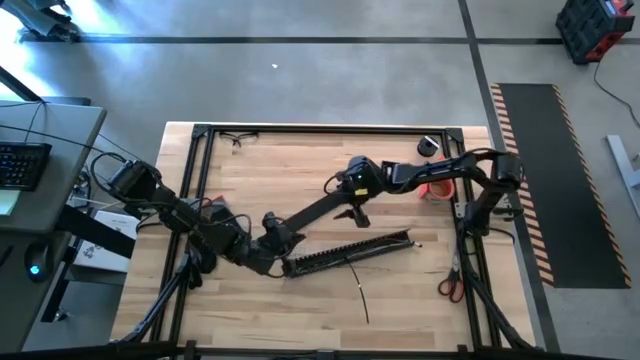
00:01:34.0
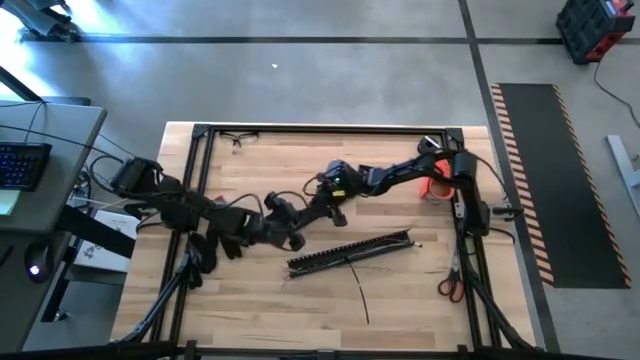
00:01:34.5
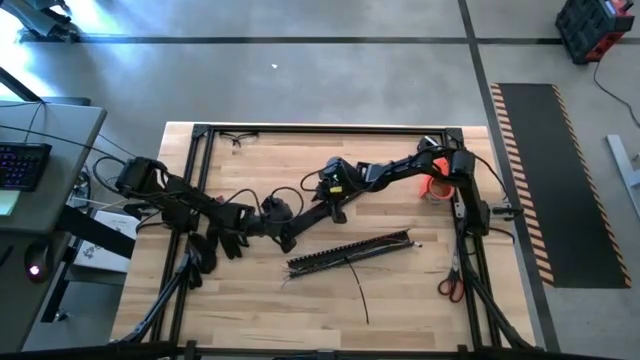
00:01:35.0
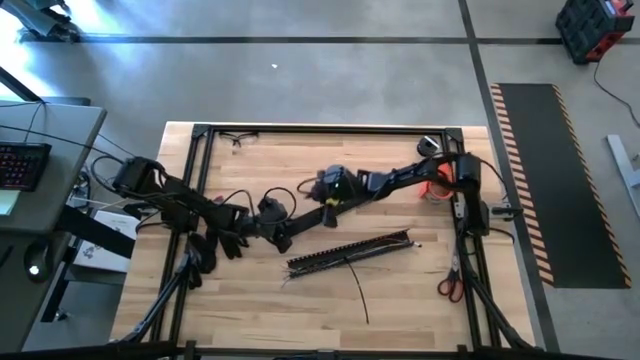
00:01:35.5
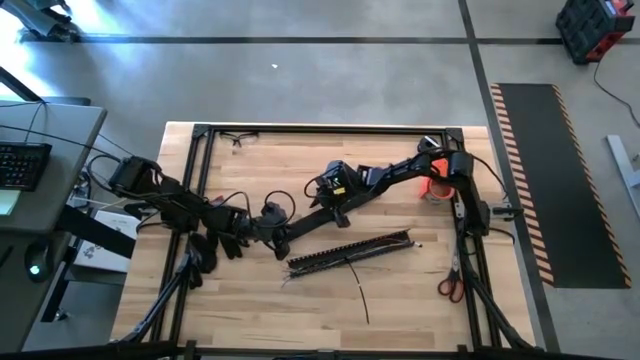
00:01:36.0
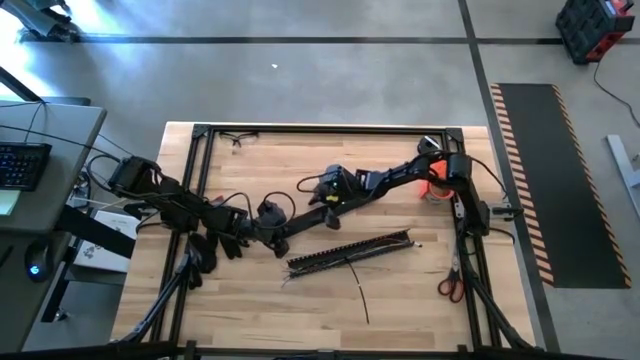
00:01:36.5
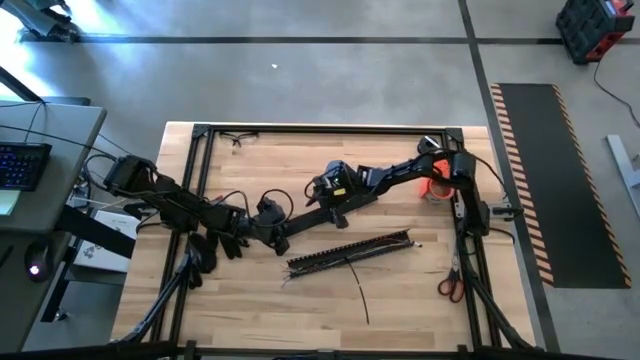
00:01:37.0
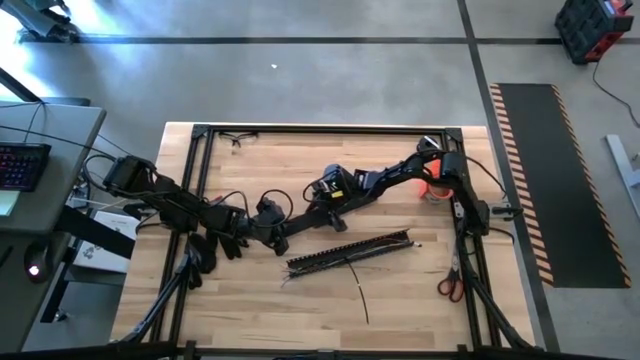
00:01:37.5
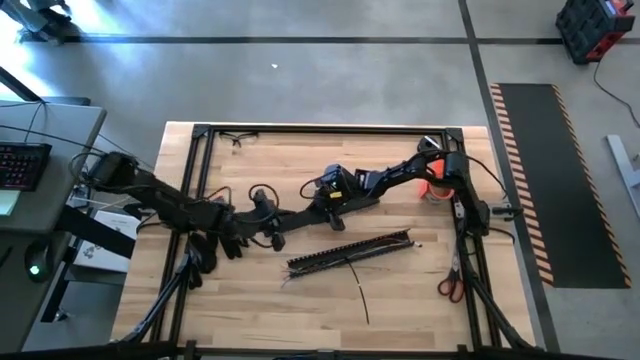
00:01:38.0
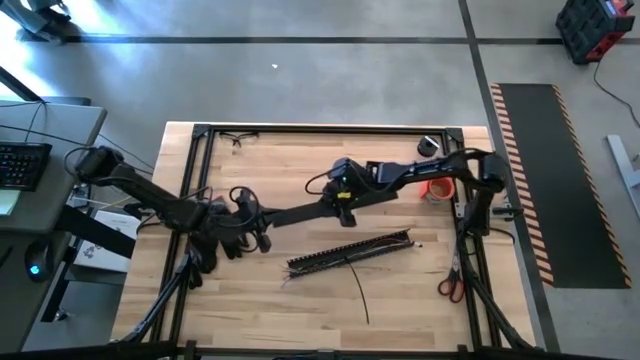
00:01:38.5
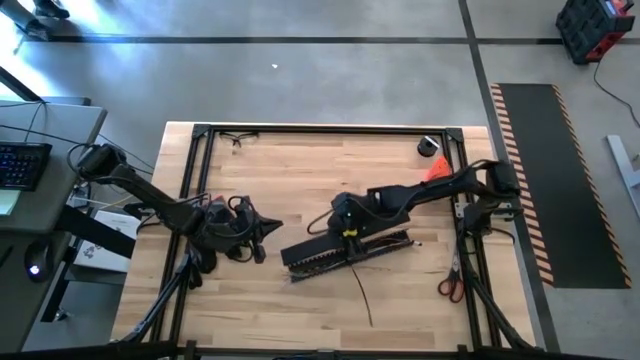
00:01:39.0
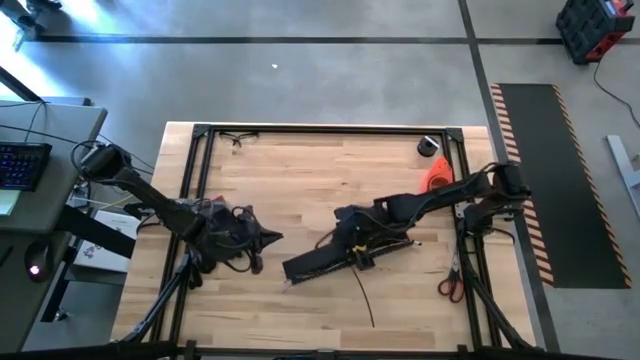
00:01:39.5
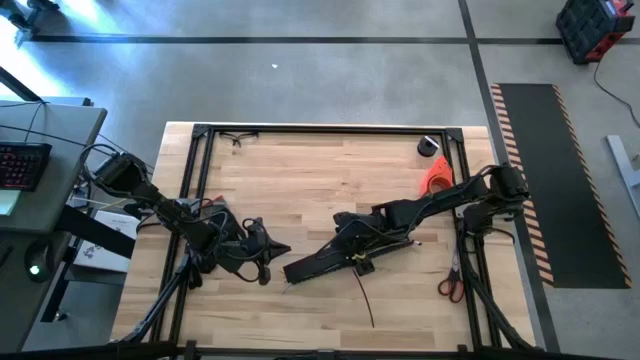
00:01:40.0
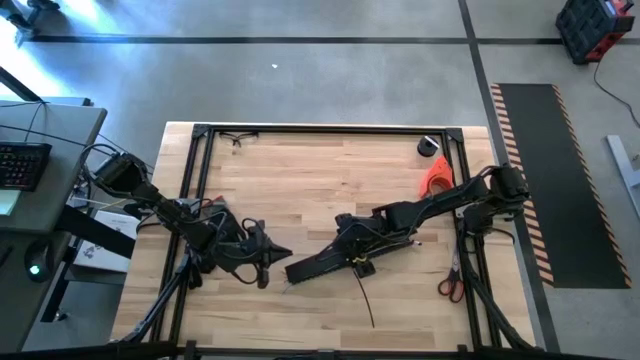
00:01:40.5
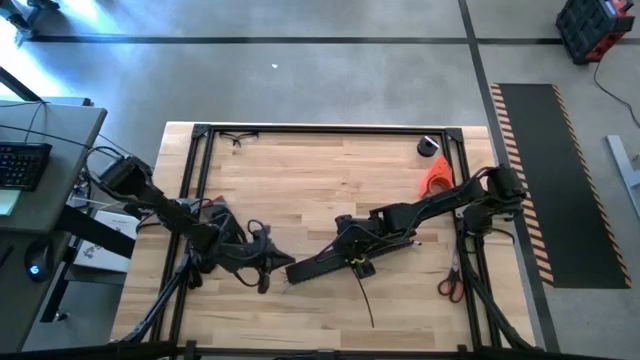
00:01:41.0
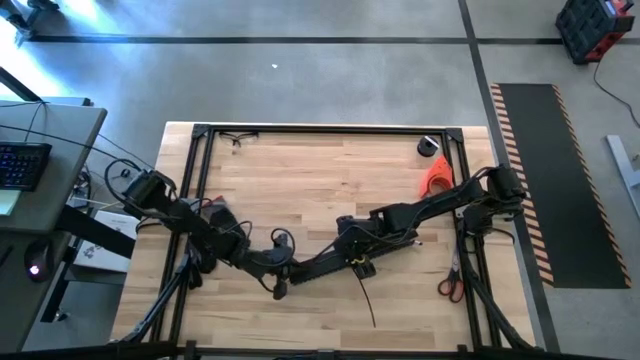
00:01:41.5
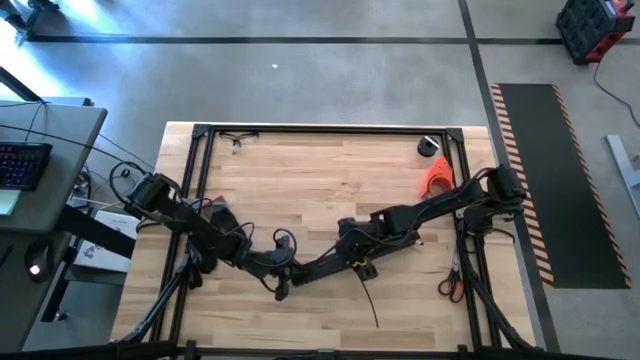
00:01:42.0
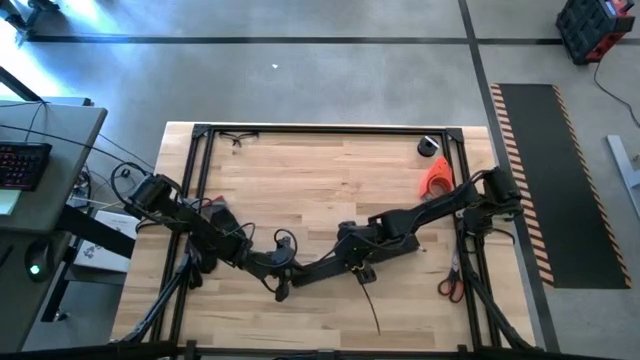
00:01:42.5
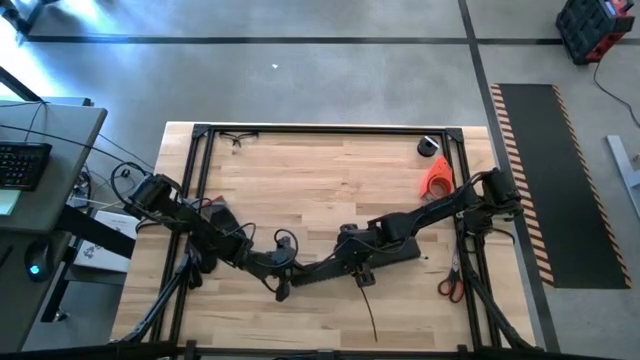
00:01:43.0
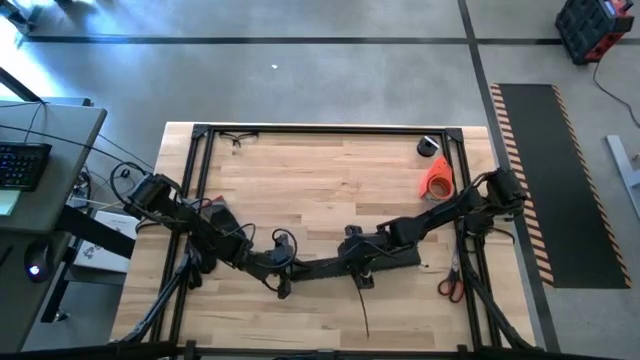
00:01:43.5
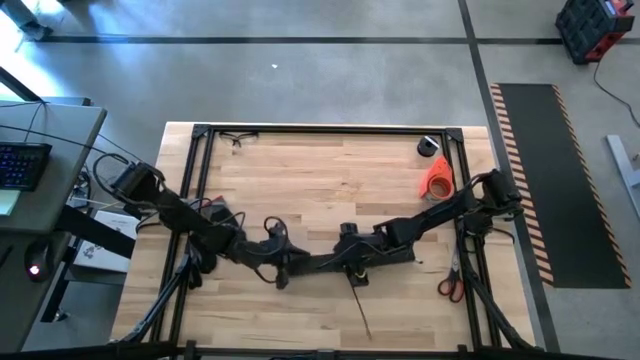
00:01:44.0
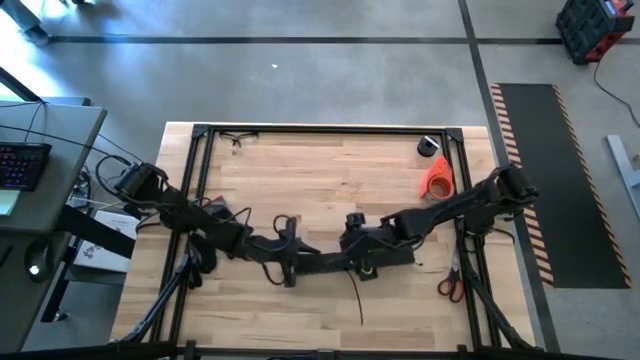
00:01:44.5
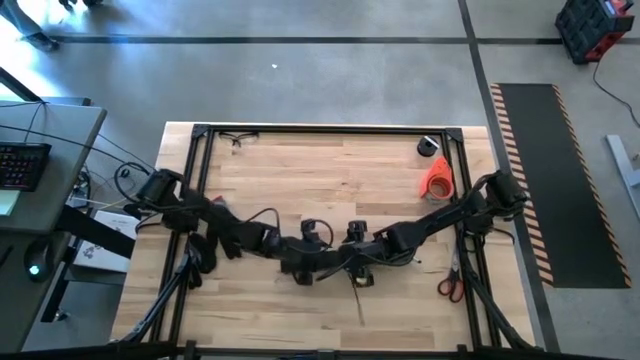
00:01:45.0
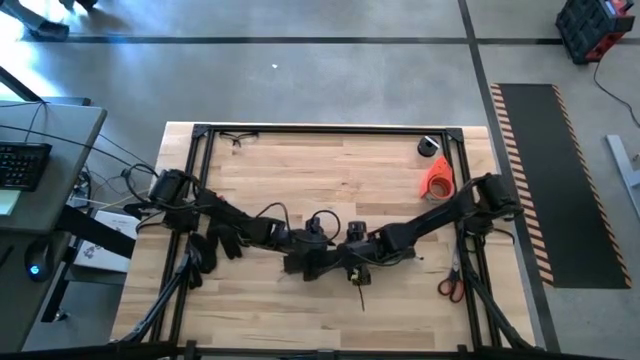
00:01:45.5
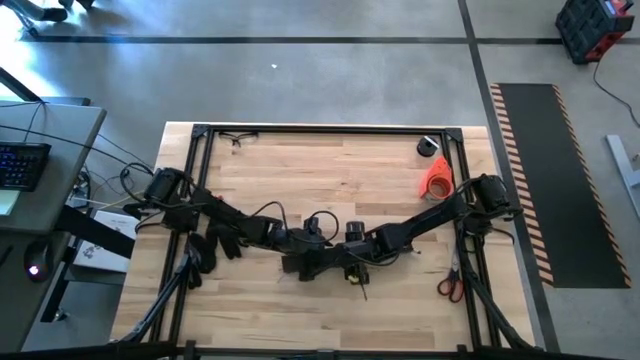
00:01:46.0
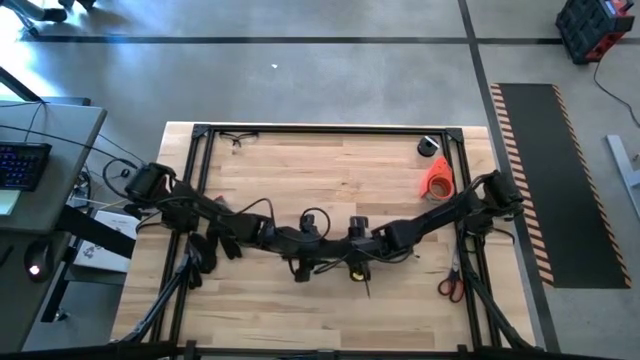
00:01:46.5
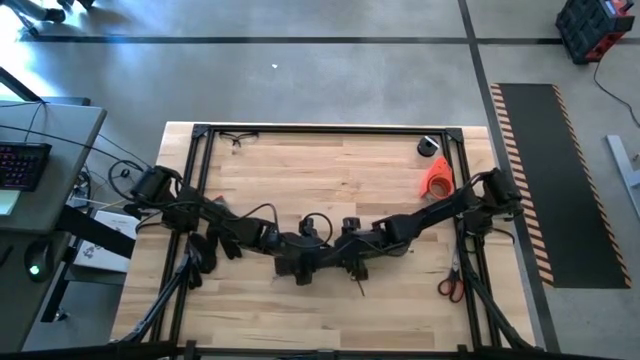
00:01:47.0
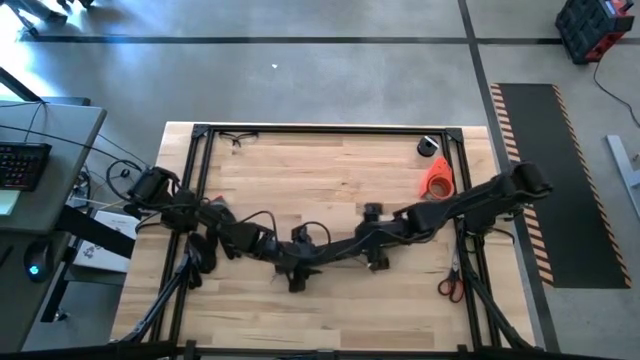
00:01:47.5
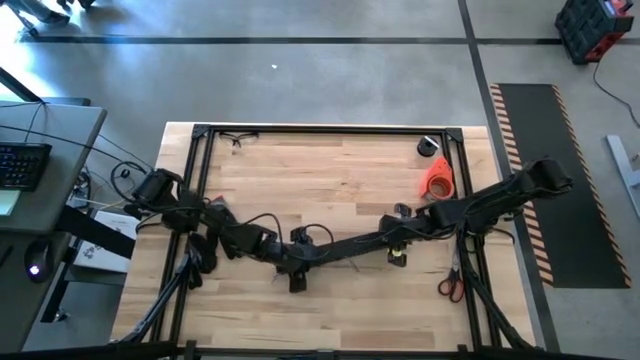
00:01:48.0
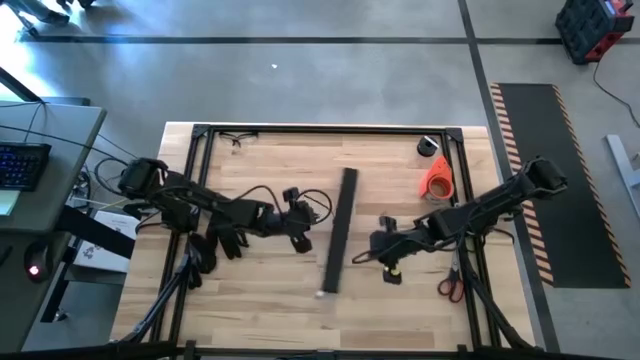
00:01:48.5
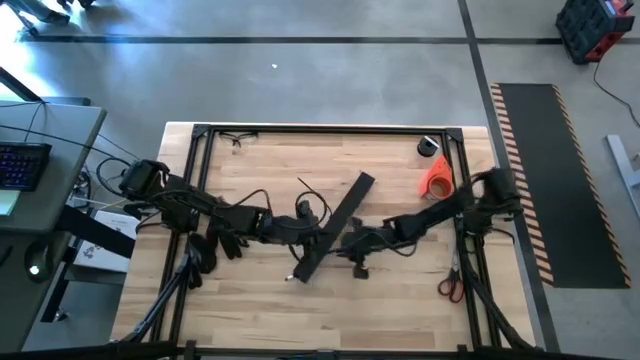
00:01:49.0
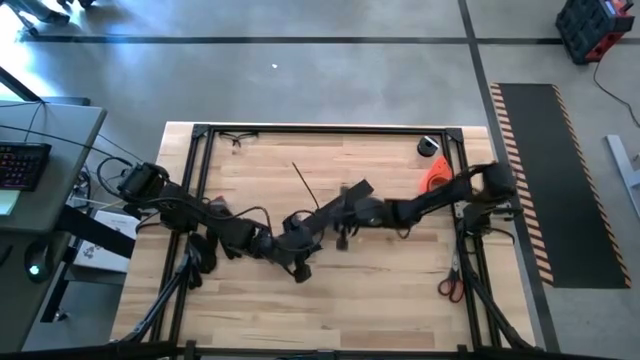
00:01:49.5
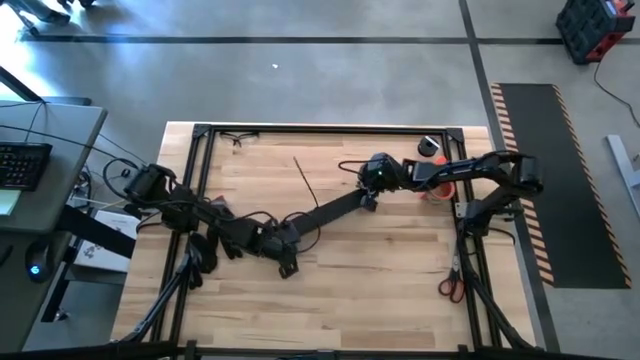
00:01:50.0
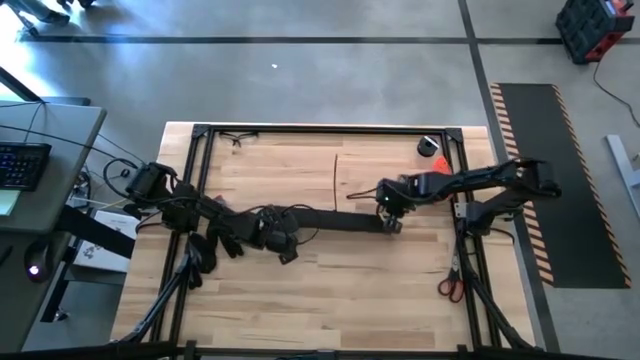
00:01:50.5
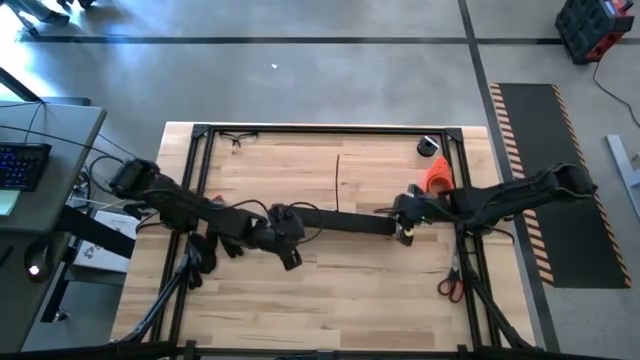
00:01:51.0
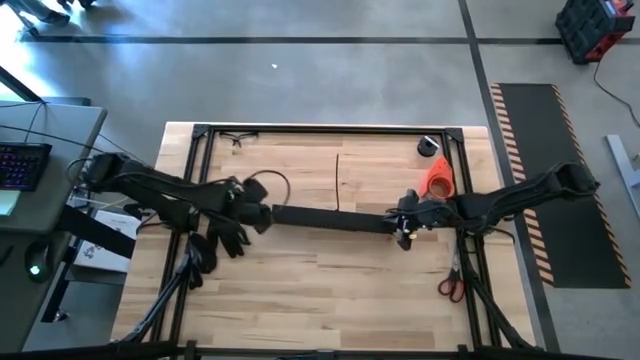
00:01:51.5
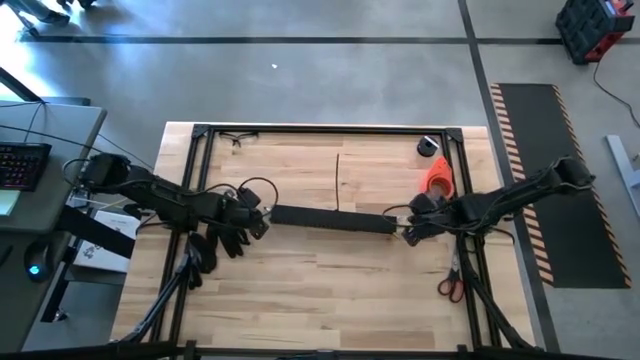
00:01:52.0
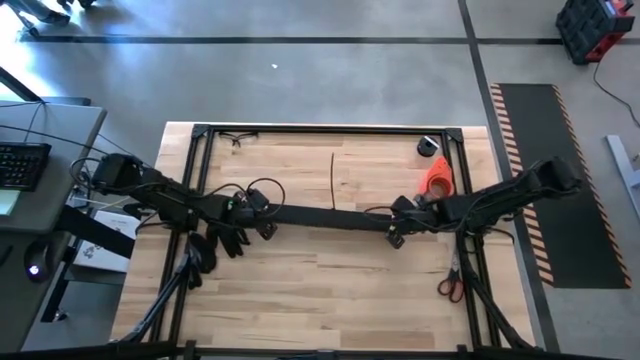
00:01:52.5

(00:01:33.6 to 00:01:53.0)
Task: Ziptie cables
Close the black cable duct

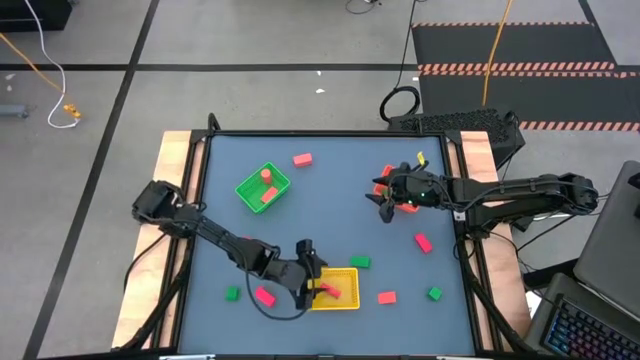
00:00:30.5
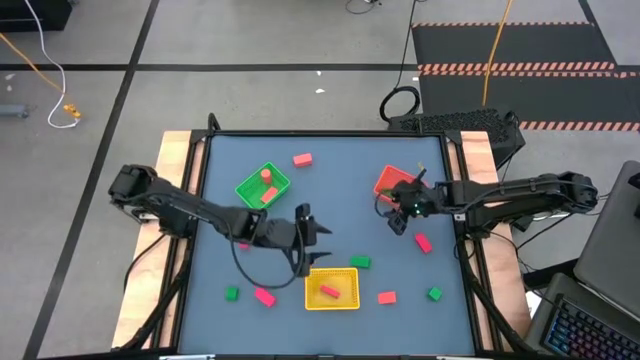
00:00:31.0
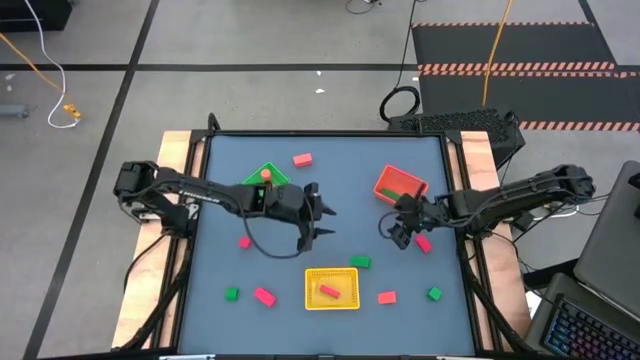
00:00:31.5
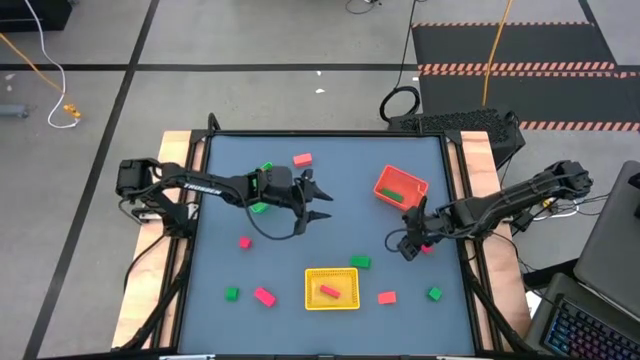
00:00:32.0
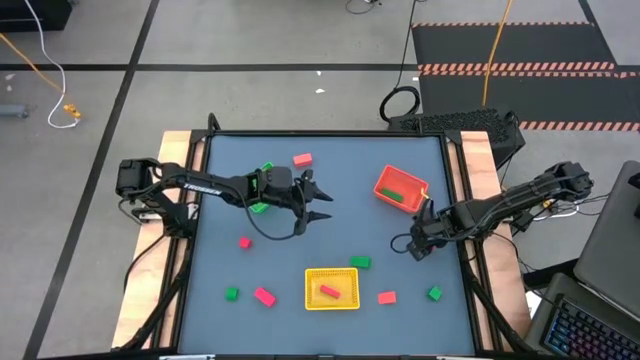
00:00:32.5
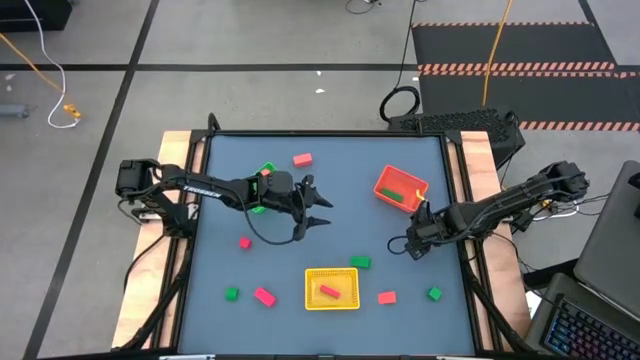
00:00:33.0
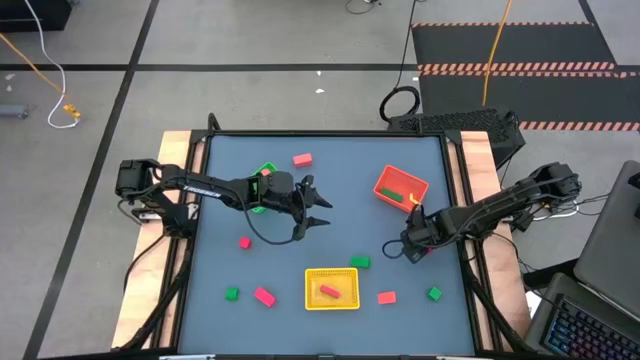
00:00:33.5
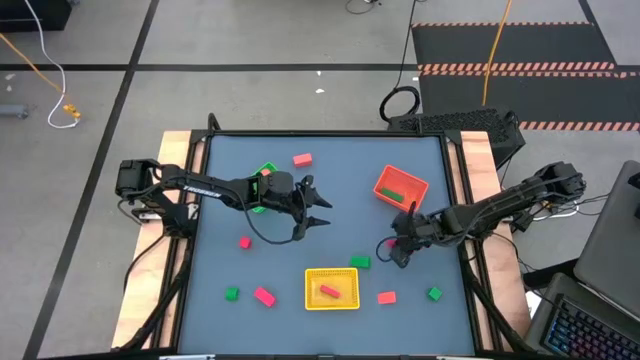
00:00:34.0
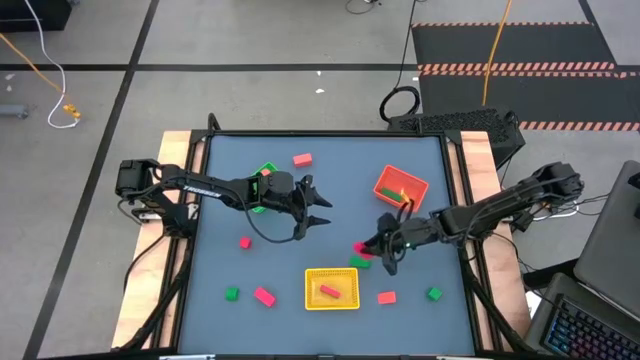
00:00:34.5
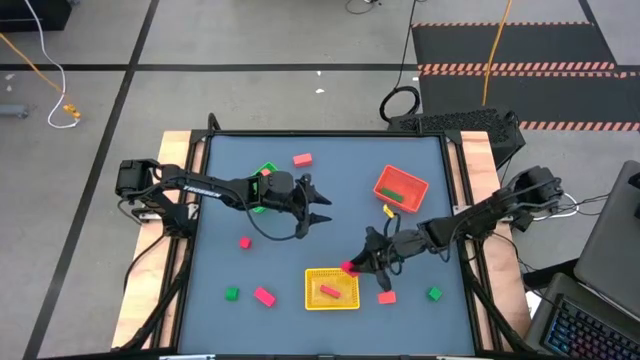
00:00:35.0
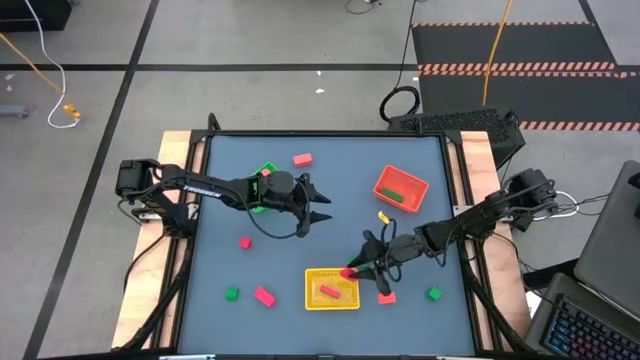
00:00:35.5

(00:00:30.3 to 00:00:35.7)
Task: Sort & place blocks by color
Put the red block into the yellow bin
